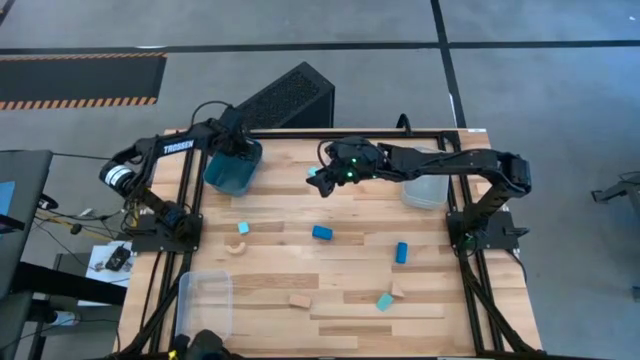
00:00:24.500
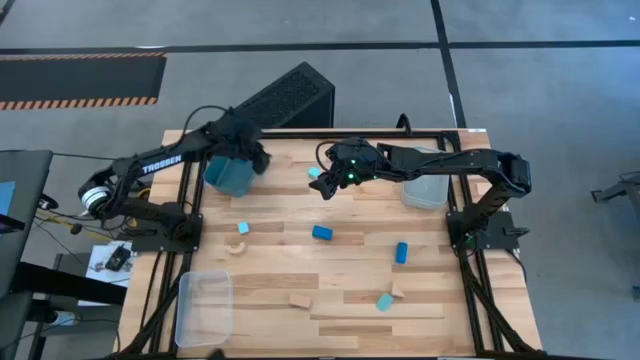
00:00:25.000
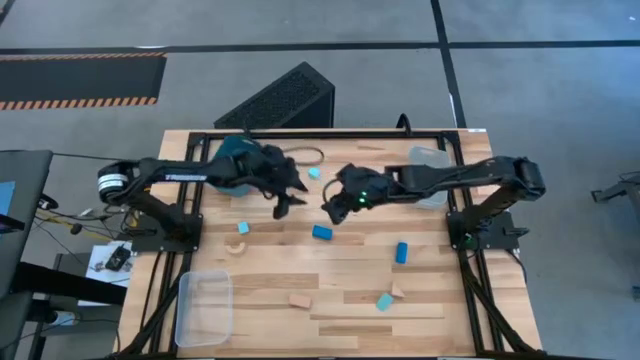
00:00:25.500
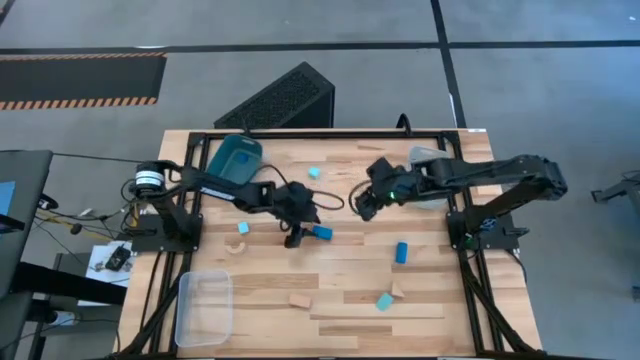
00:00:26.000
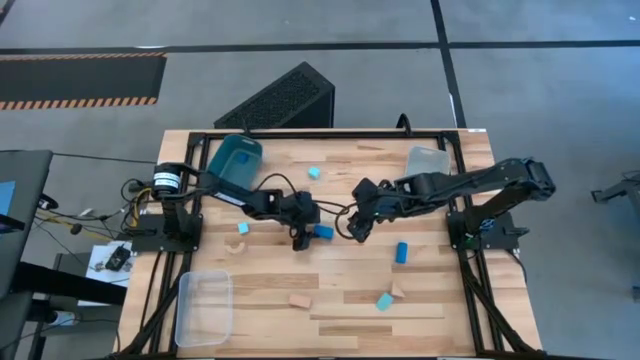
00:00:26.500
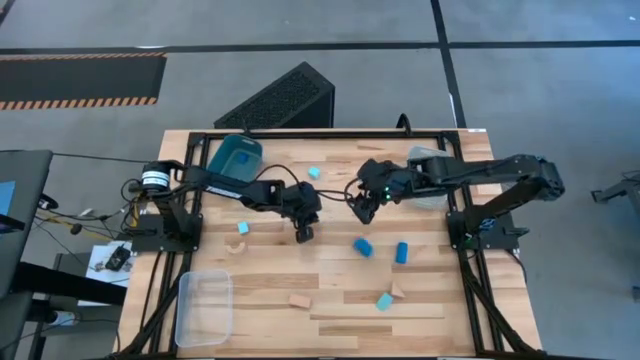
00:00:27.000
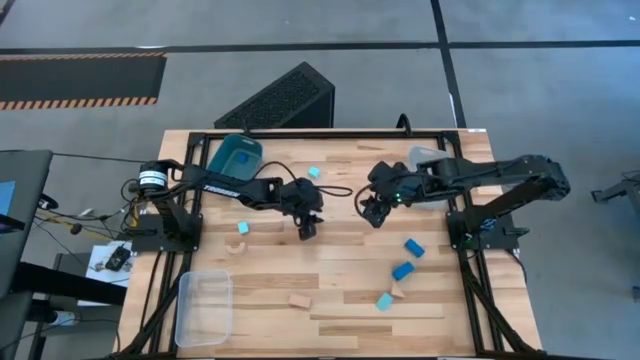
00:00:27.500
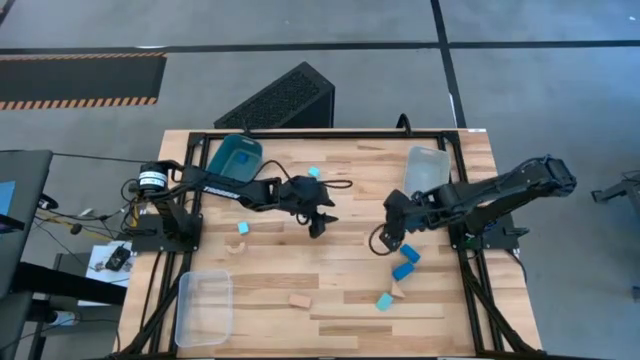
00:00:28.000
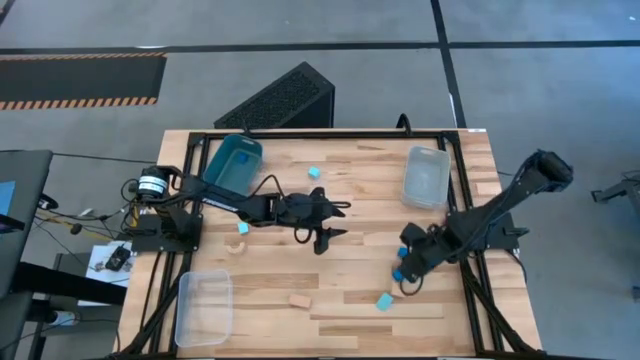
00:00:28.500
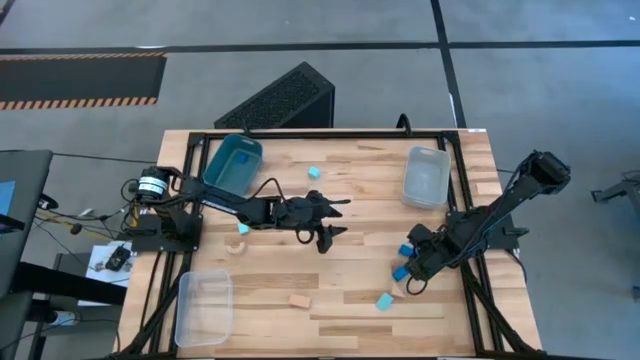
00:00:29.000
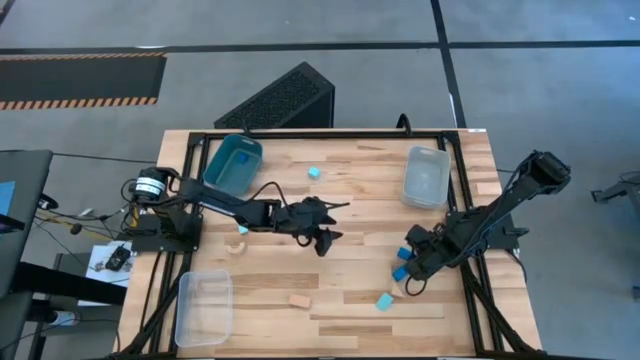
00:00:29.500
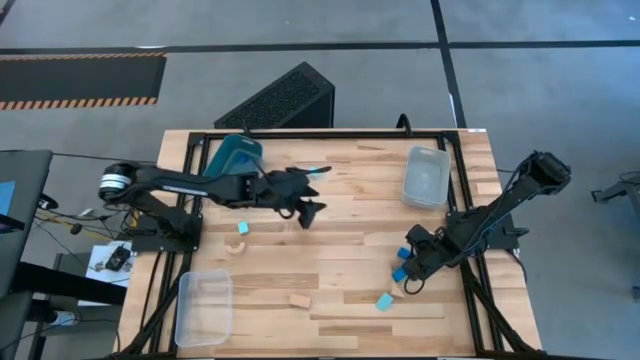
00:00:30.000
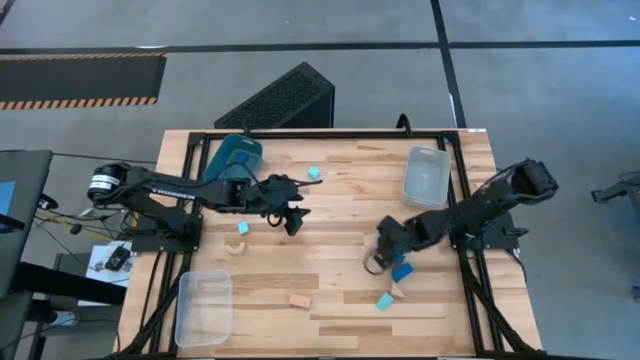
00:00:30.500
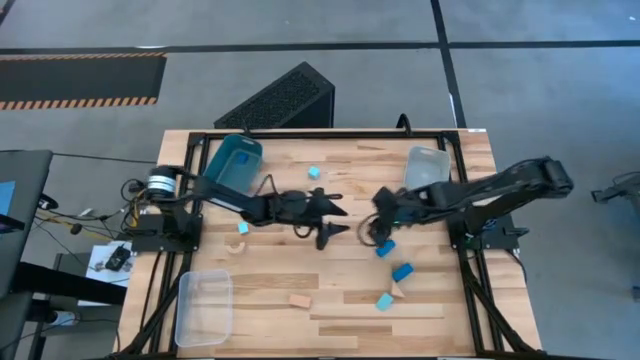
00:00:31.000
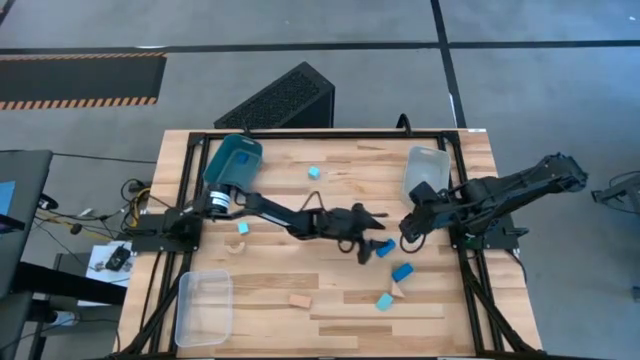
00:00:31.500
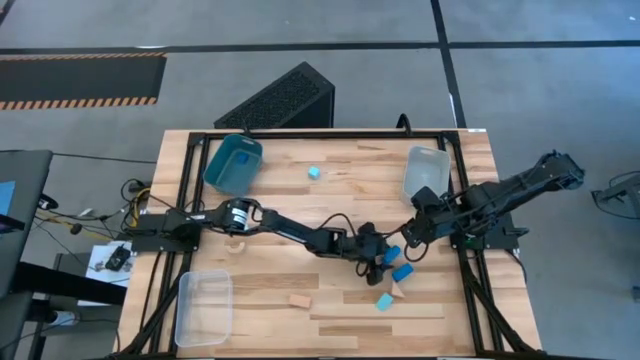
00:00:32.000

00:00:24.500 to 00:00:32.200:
Task: Sort & place blocks by color
Put the left blue block into the blue bin

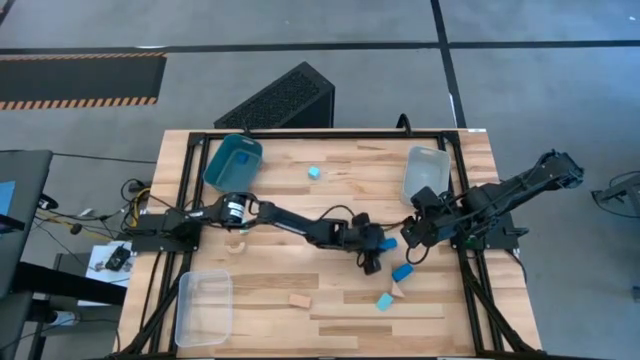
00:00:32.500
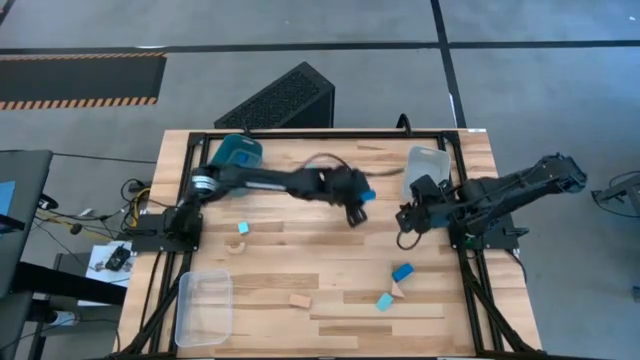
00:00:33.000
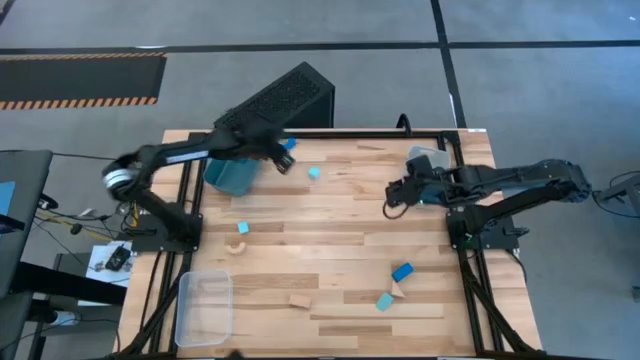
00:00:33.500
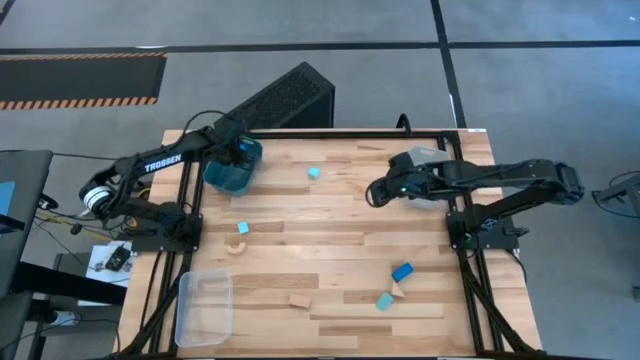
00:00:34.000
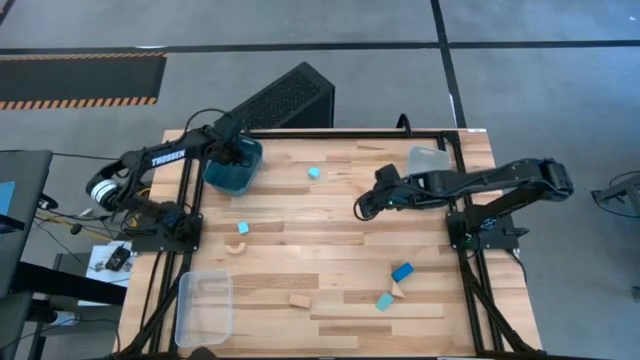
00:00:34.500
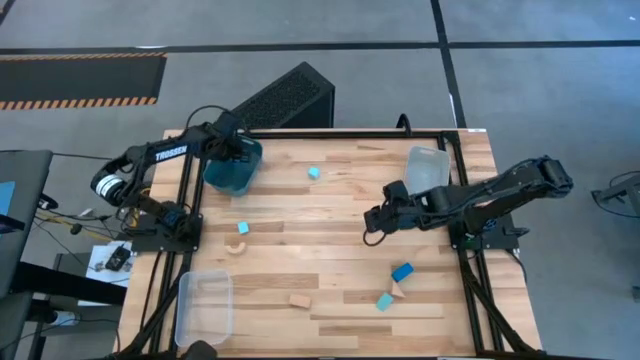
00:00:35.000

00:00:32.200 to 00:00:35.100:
Put the left blue block into the blue bin

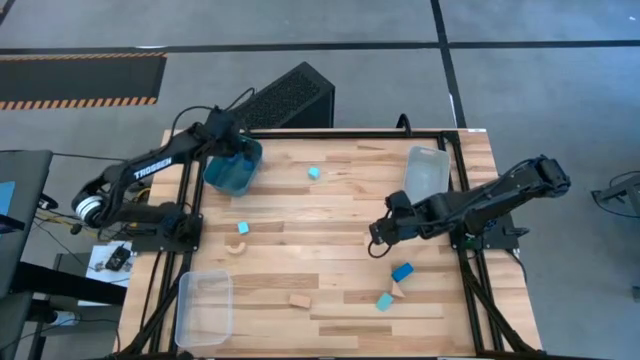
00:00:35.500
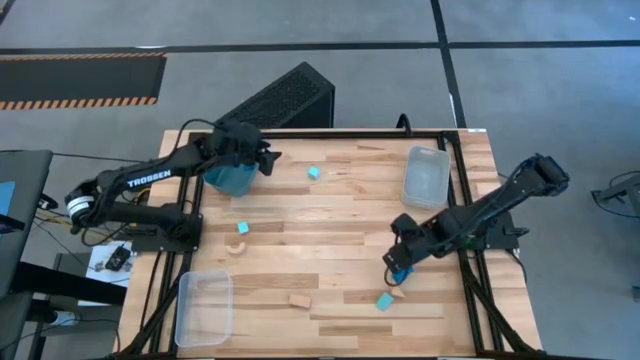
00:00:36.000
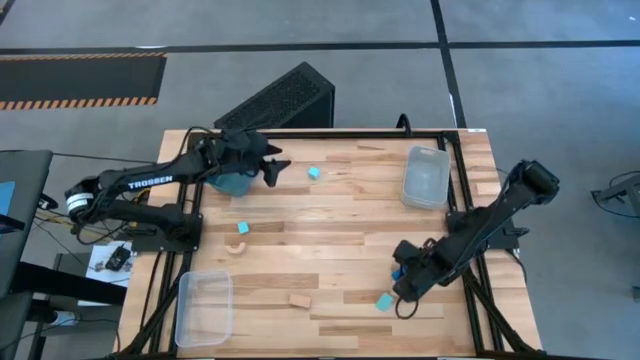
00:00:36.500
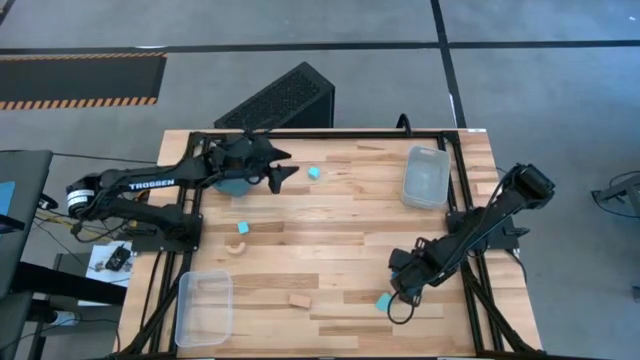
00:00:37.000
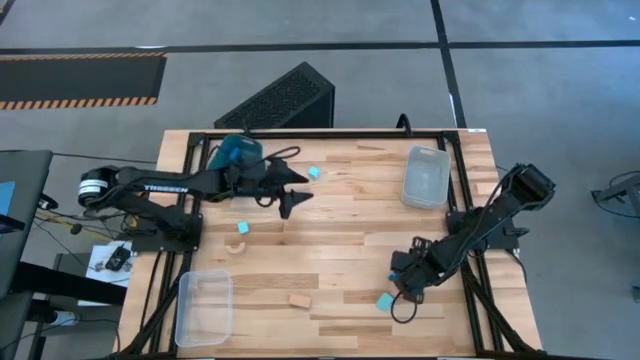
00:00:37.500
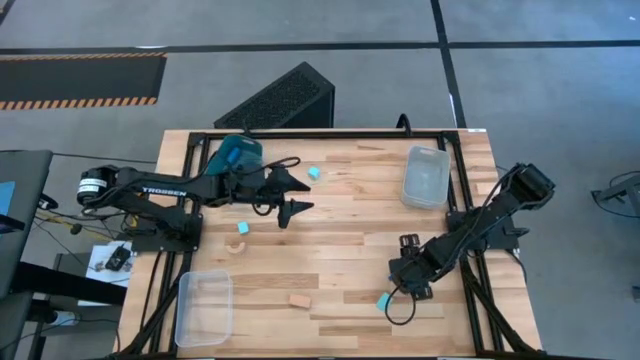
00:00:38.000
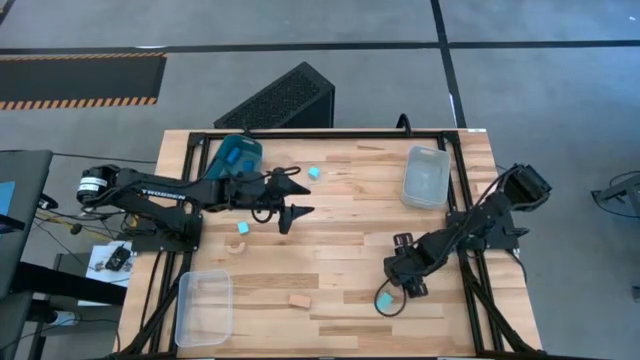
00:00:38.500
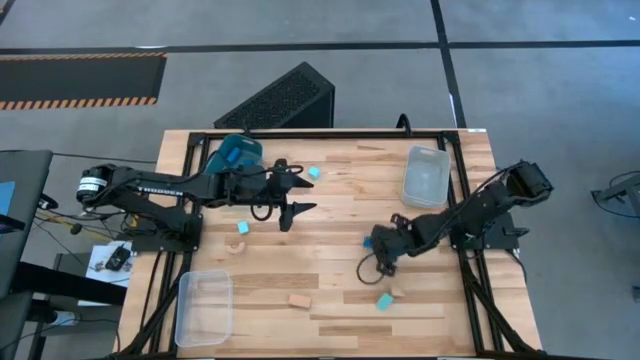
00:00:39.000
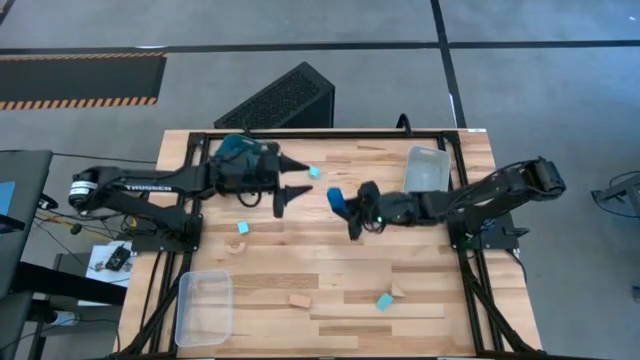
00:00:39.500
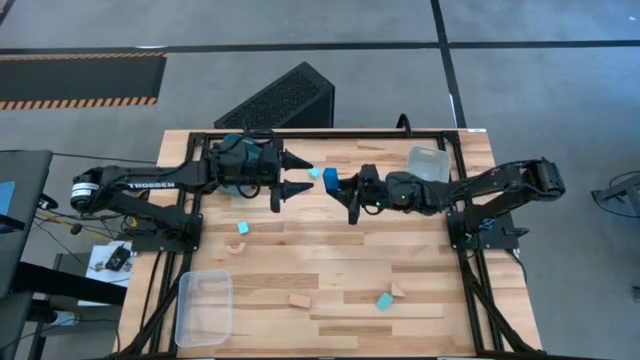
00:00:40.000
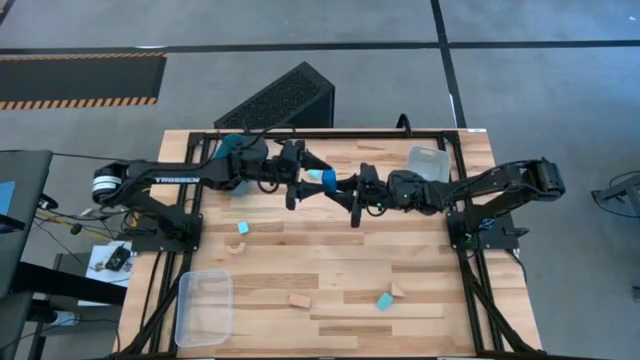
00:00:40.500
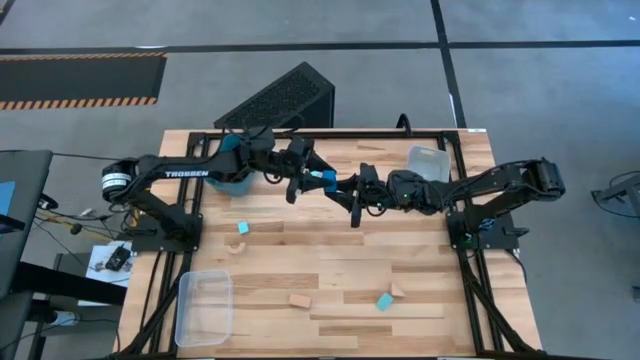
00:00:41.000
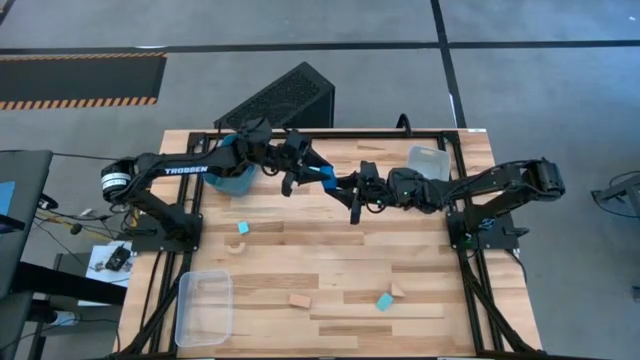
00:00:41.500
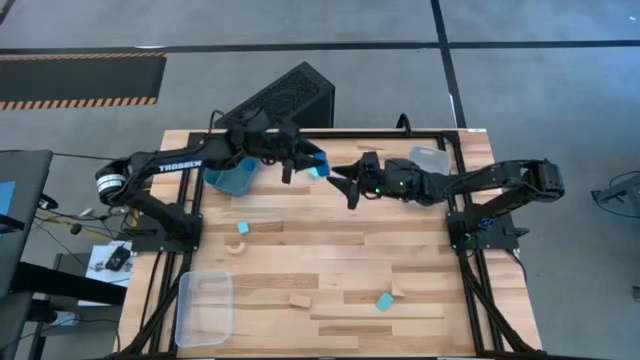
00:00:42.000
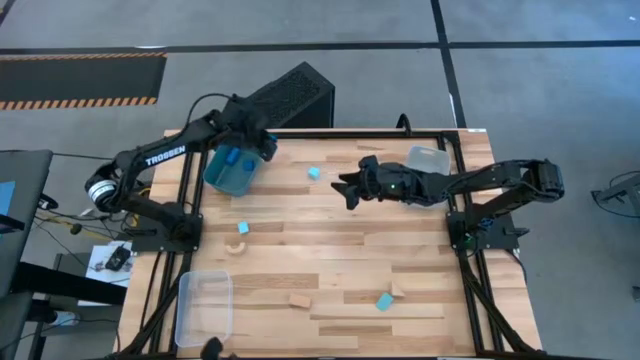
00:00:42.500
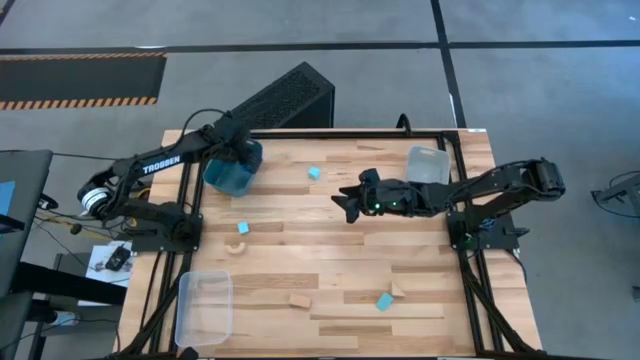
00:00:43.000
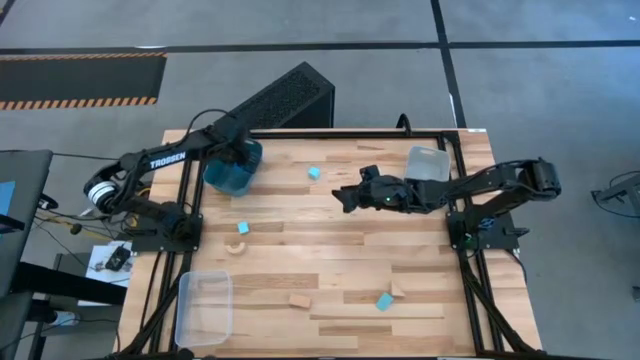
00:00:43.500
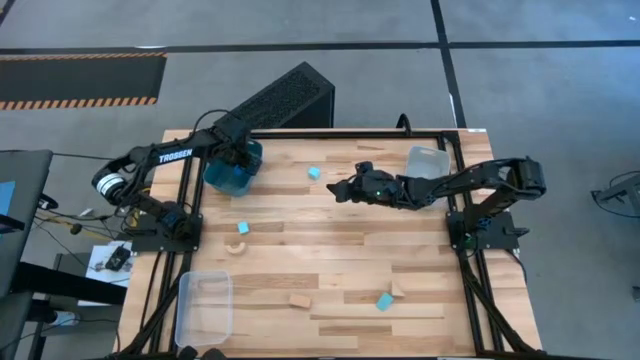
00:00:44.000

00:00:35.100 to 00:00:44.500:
Put the blue block into the blue bin
